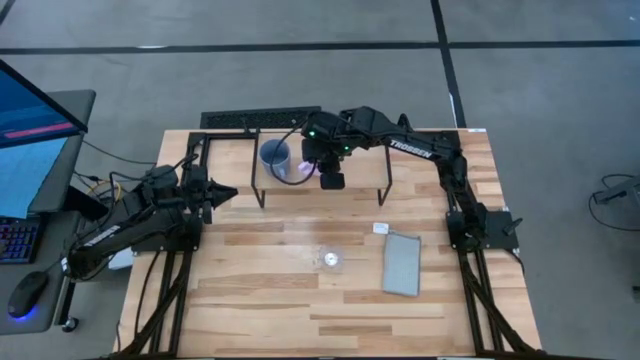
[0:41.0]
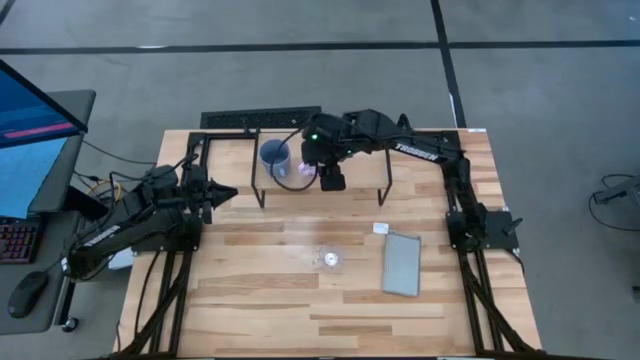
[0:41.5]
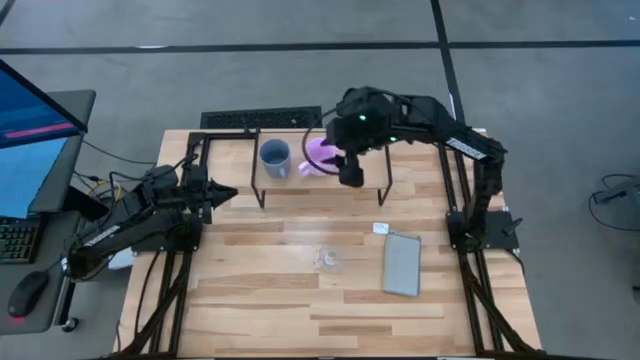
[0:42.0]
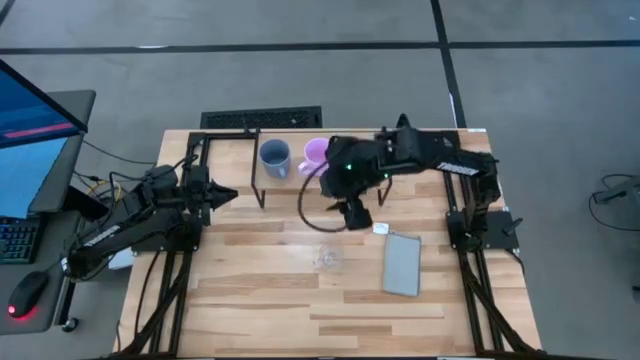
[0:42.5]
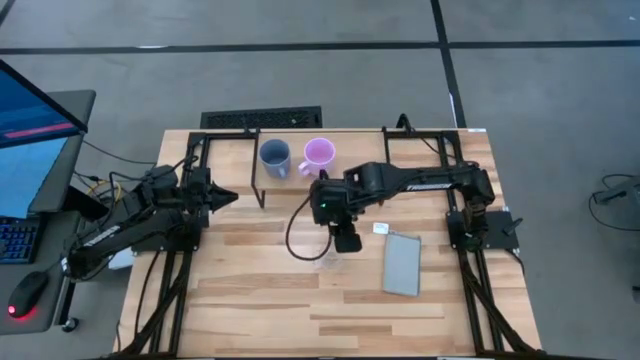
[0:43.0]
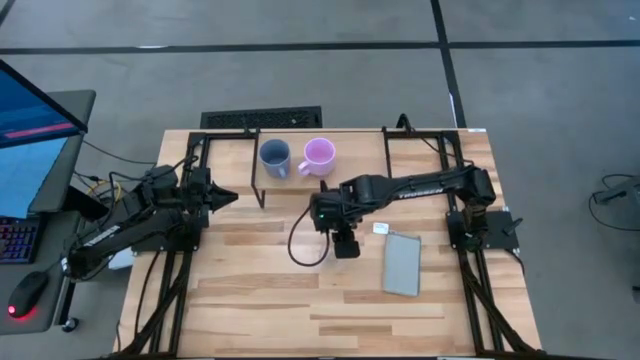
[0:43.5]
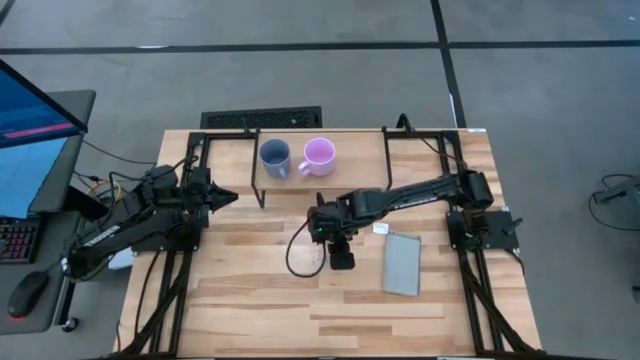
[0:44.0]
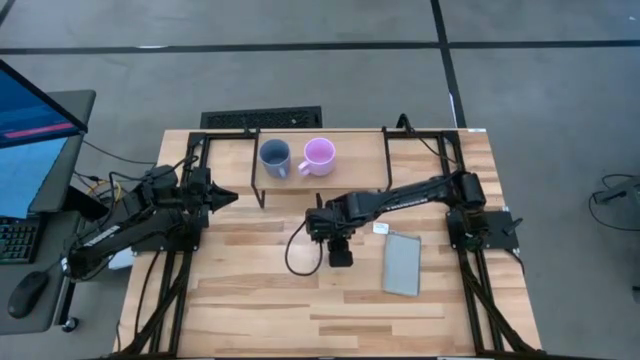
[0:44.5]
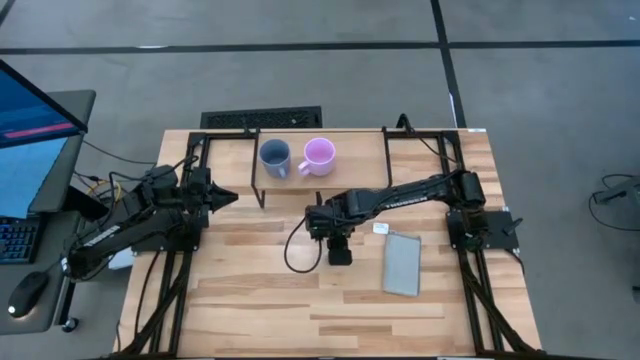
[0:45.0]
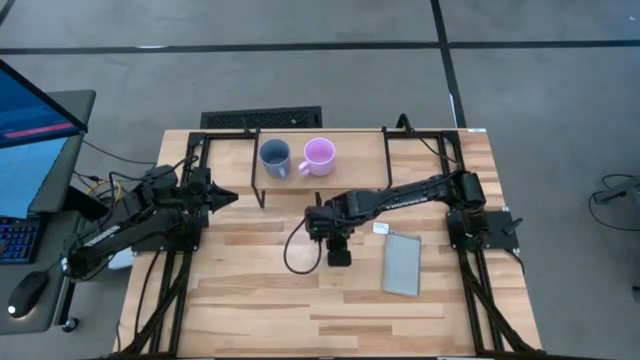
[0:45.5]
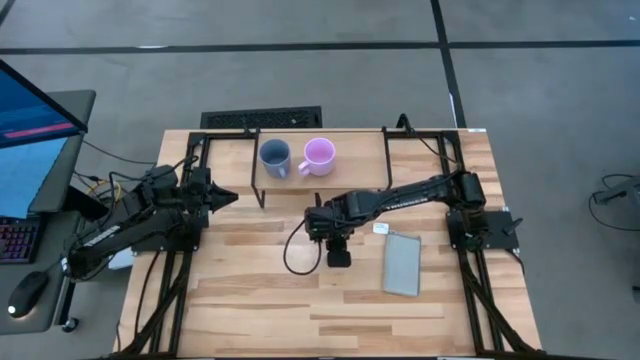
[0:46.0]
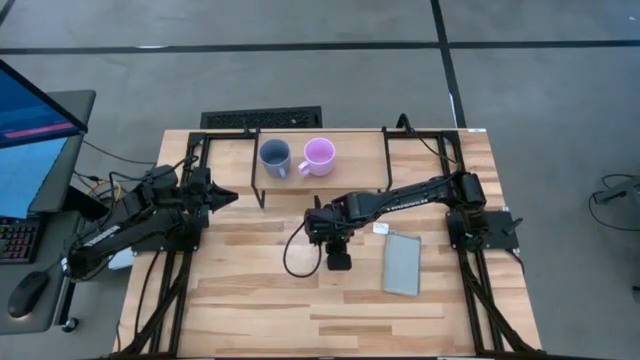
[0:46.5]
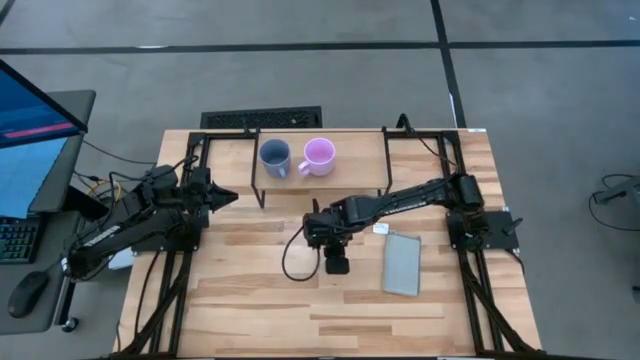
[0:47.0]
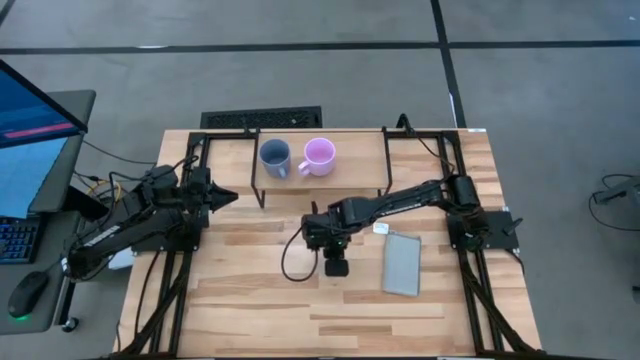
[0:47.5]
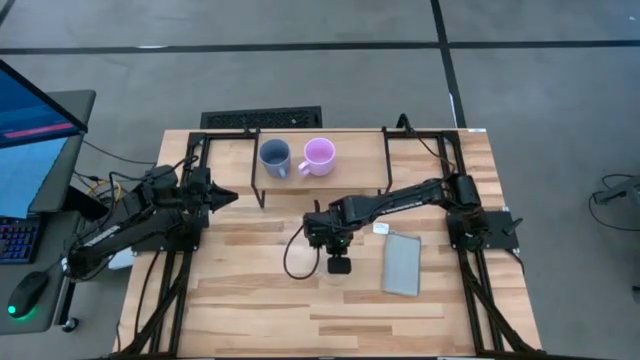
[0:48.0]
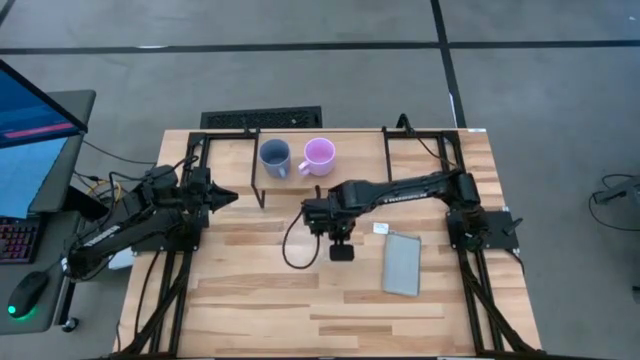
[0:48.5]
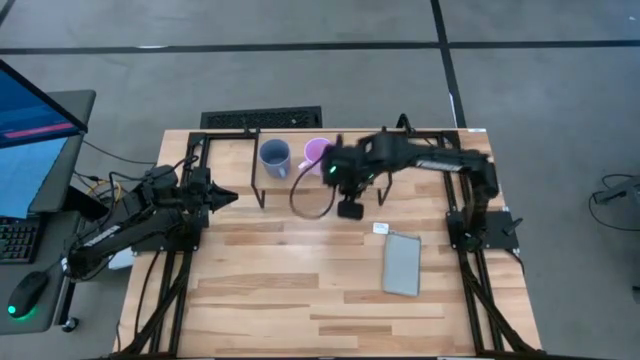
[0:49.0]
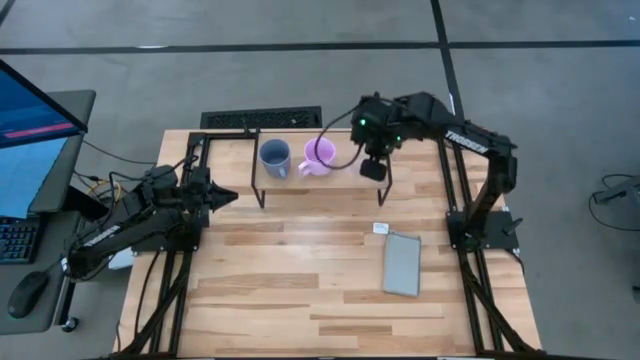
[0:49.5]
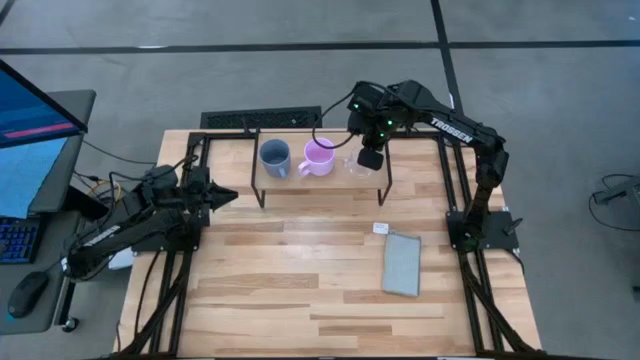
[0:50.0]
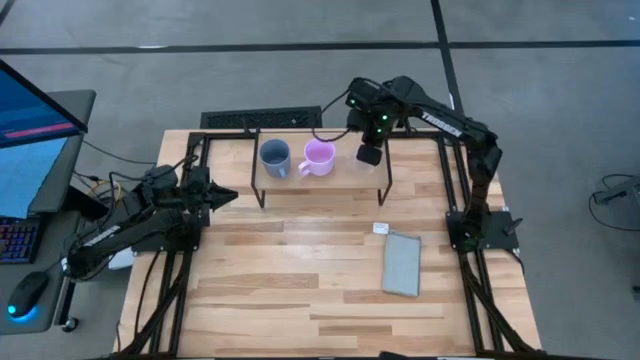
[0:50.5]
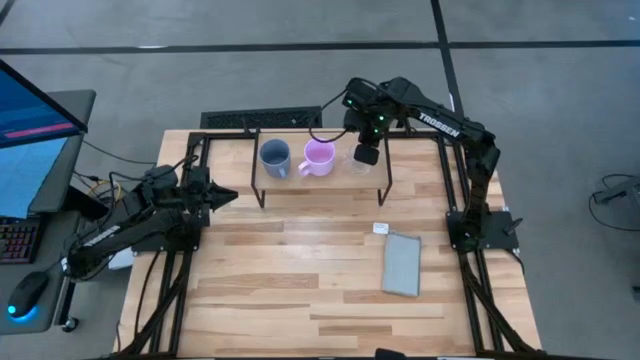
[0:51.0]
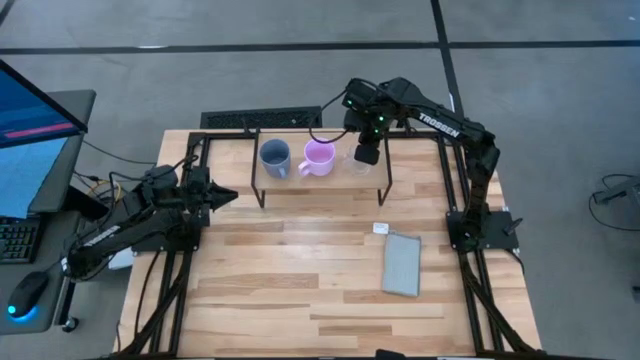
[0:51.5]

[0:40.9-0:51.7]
Task: Stack small to large cups/mugs on shelf
Put the transparent cup on the shelf

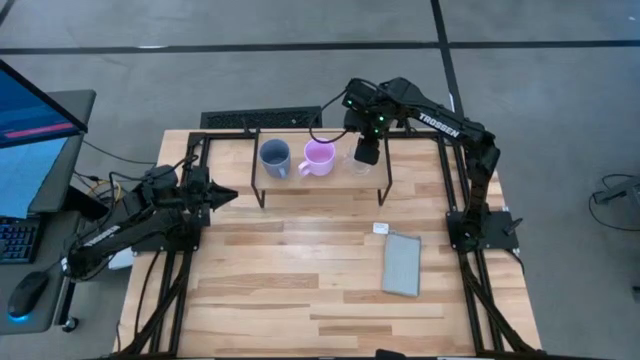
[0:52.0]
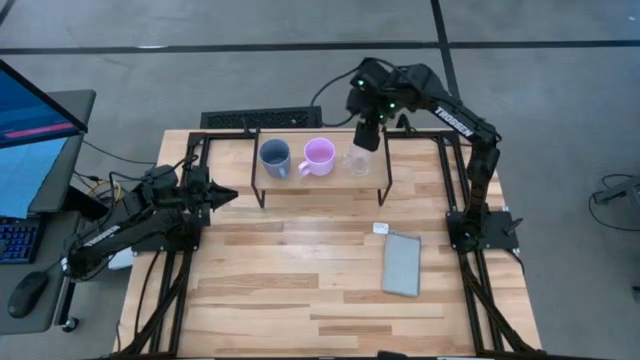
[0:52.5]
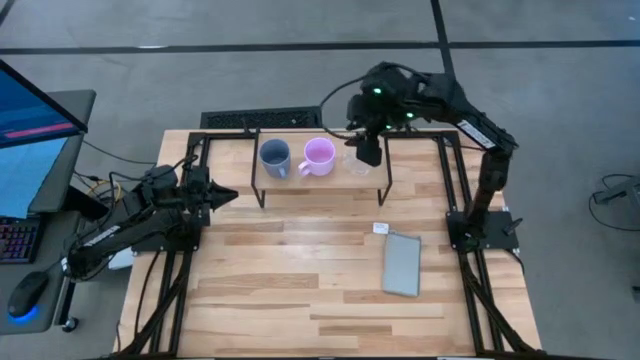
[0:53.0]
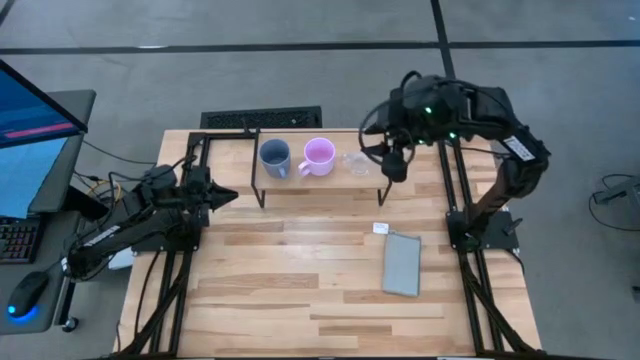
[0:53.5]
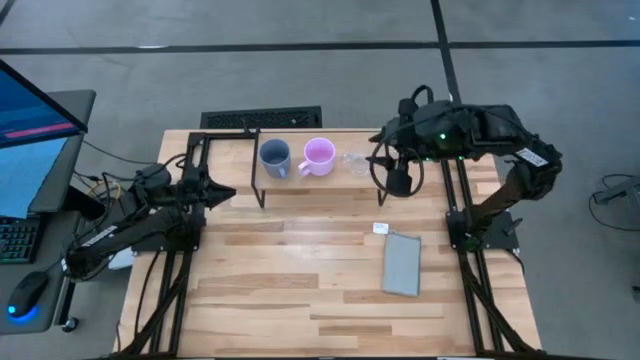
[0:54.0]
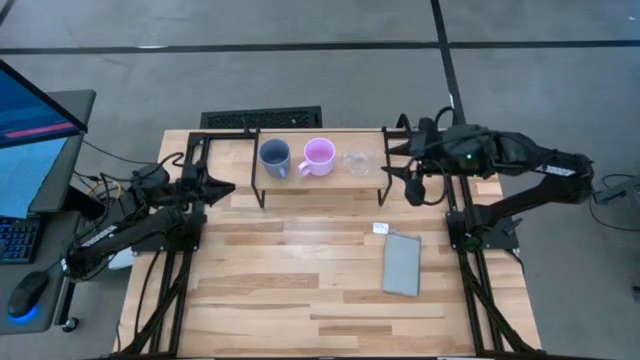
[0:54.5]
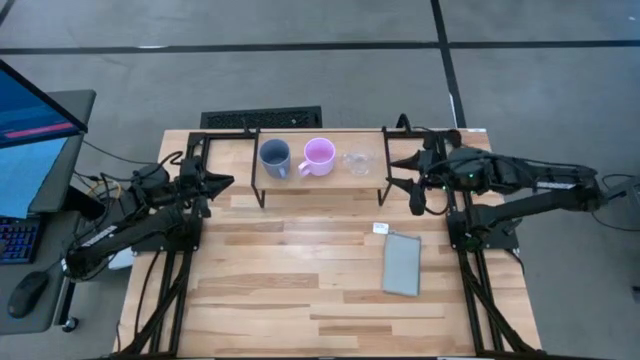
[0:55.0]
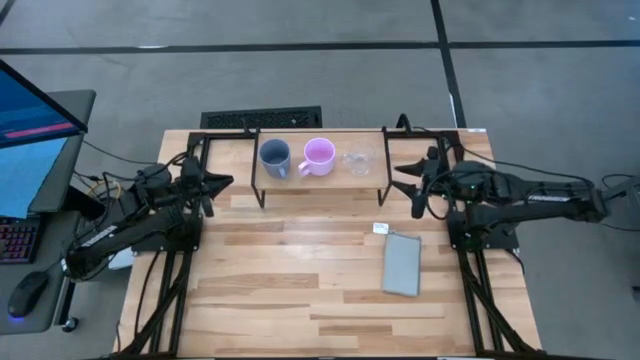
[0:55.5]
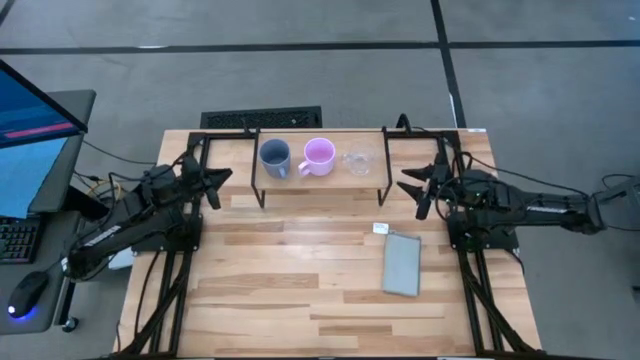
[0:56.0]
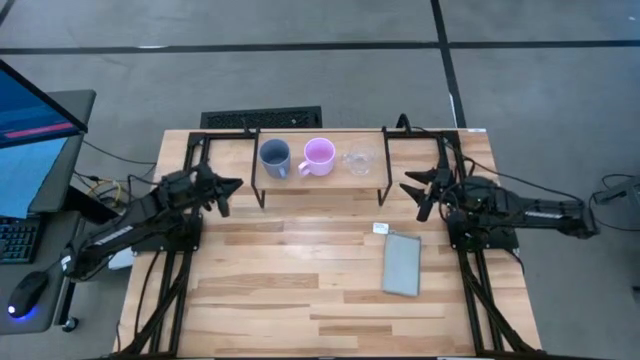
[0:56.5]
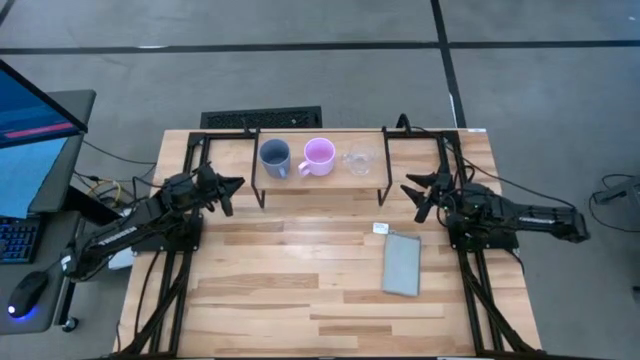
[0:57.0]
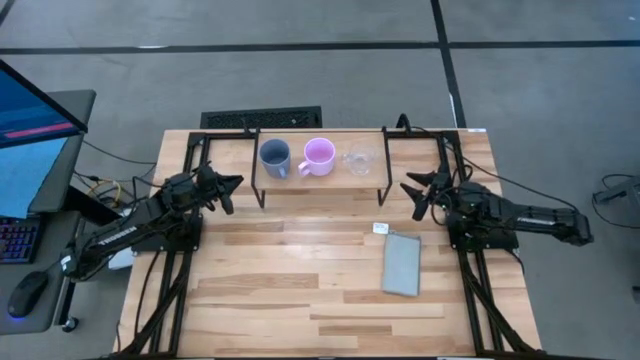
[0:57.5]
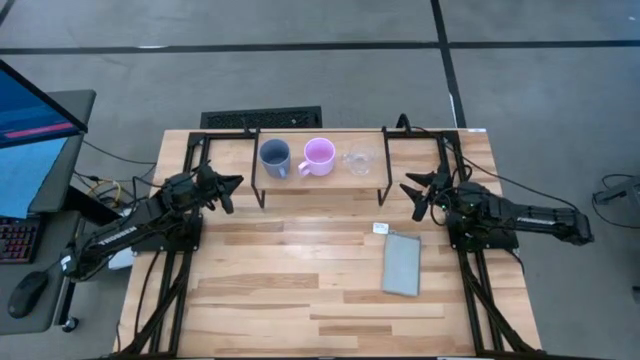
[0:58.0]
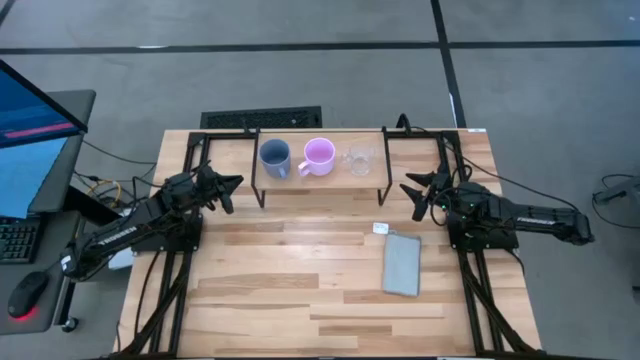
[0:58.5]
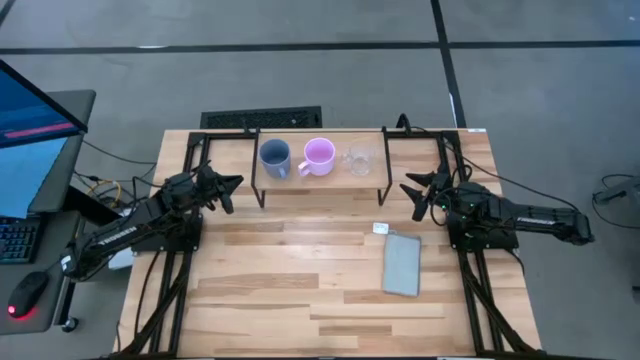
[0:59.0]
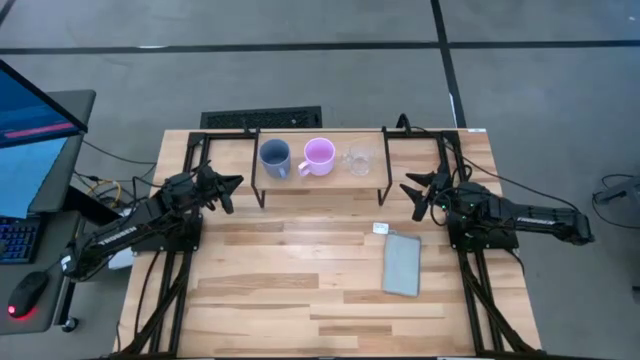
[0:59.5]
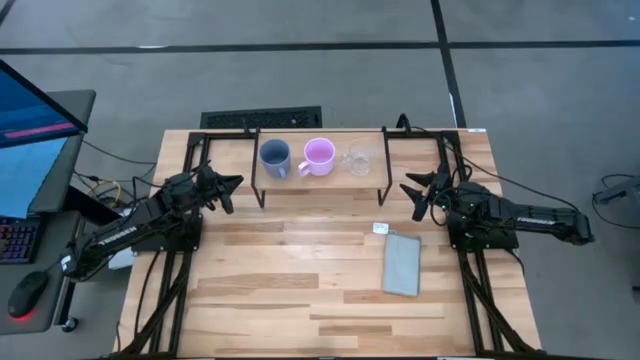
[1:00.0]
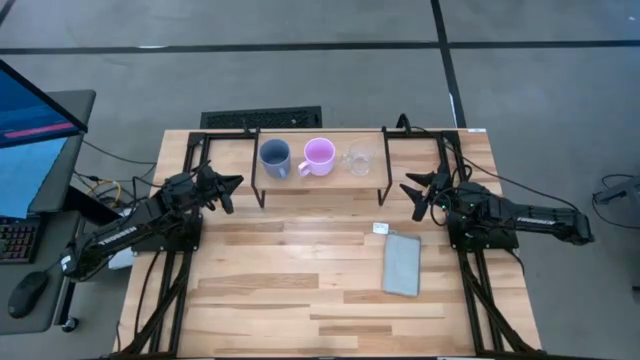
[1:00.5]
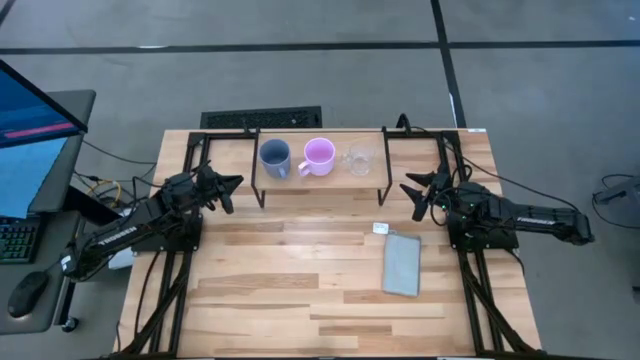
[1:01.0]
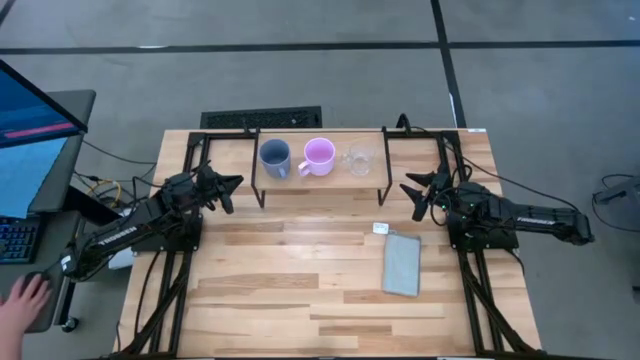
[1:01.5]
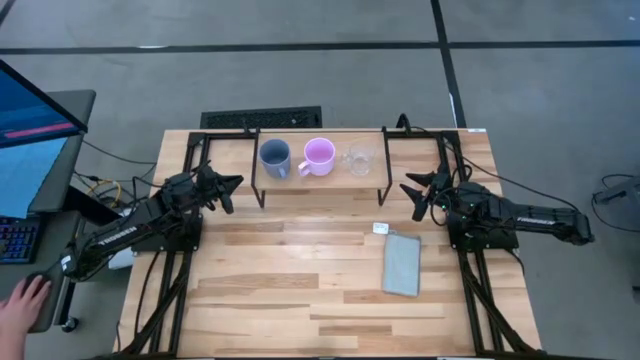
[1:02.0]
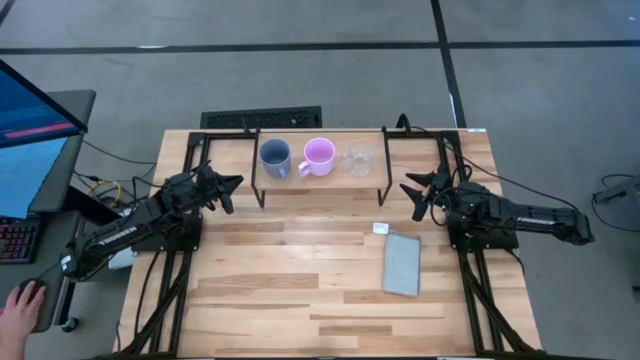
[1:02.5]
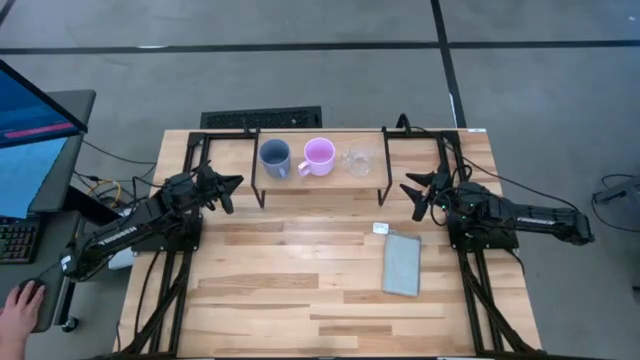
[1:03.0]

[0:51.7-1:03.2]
Return to Home Position
